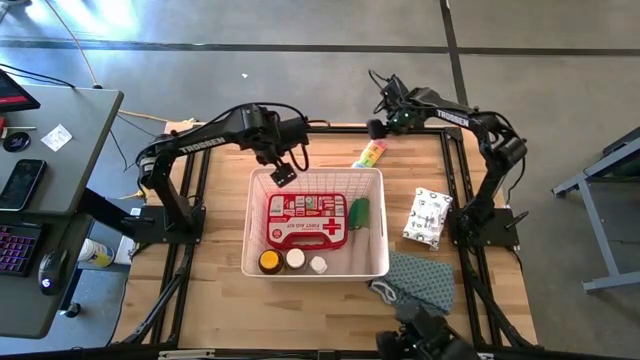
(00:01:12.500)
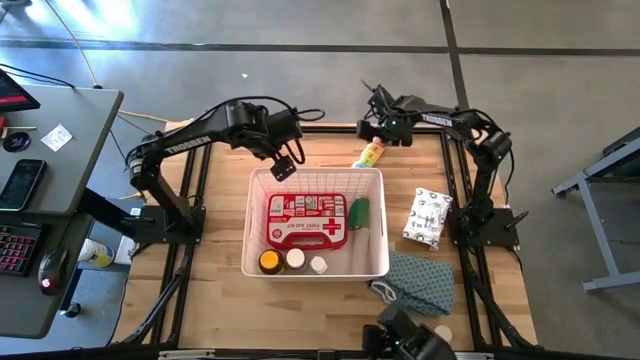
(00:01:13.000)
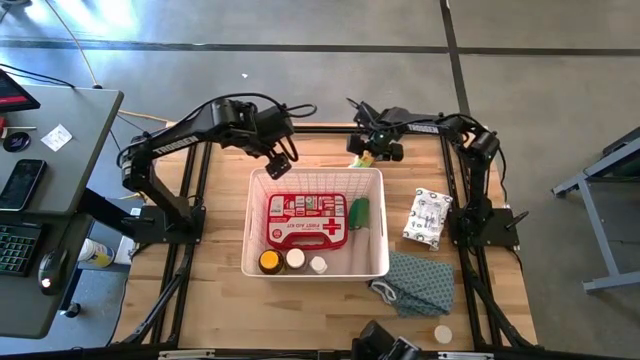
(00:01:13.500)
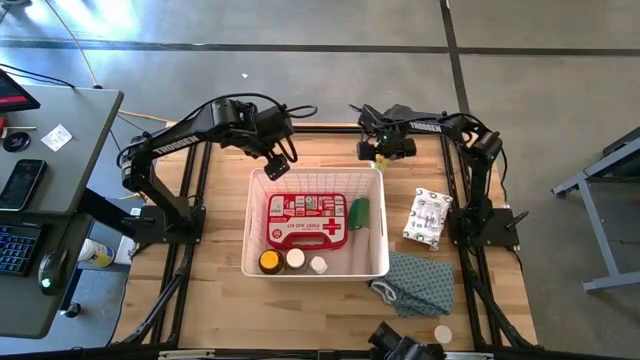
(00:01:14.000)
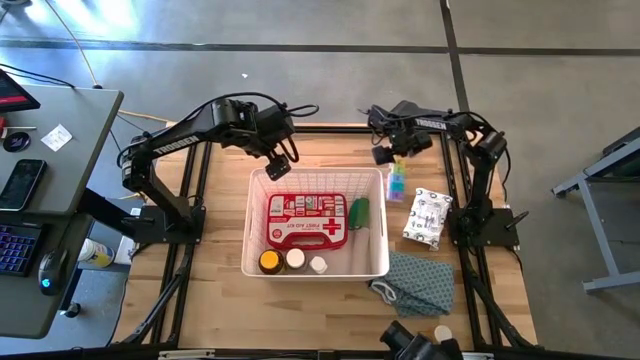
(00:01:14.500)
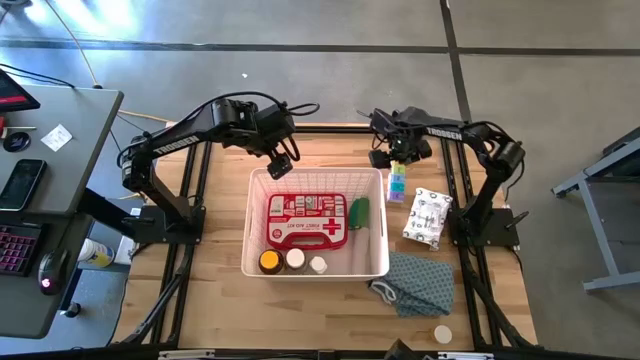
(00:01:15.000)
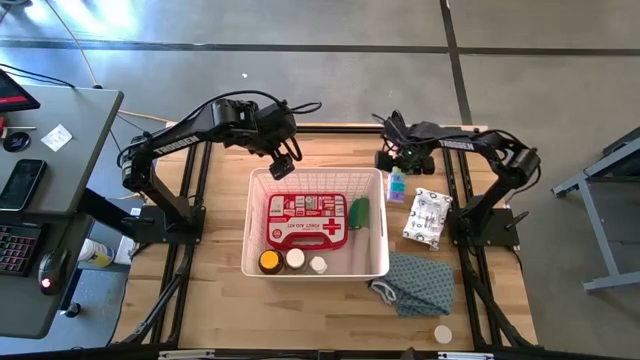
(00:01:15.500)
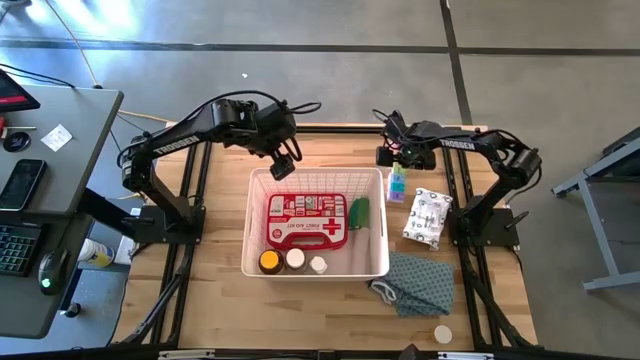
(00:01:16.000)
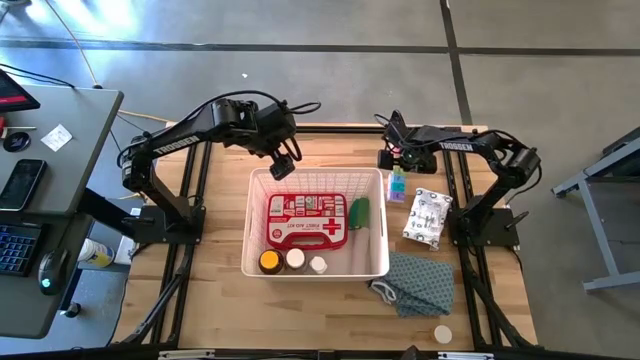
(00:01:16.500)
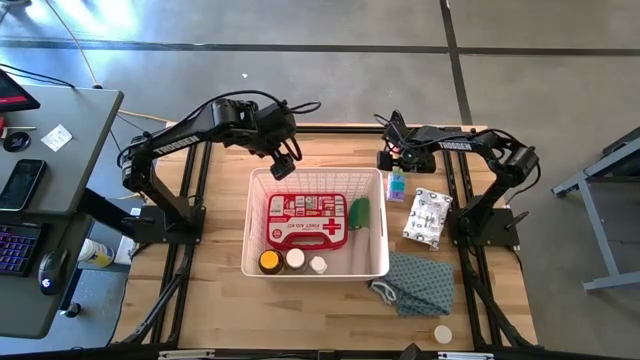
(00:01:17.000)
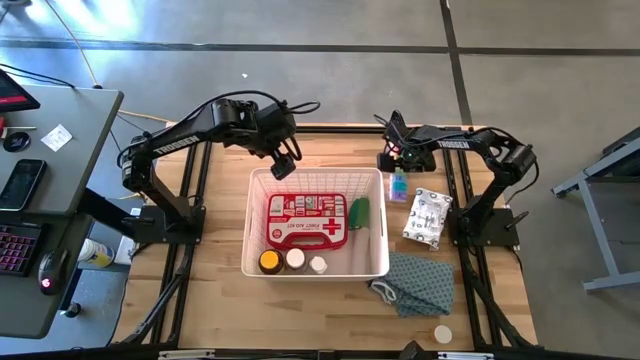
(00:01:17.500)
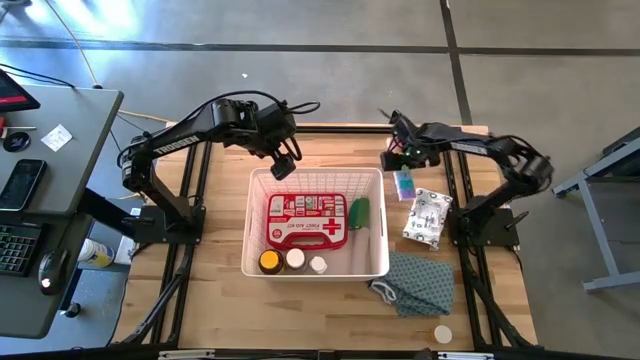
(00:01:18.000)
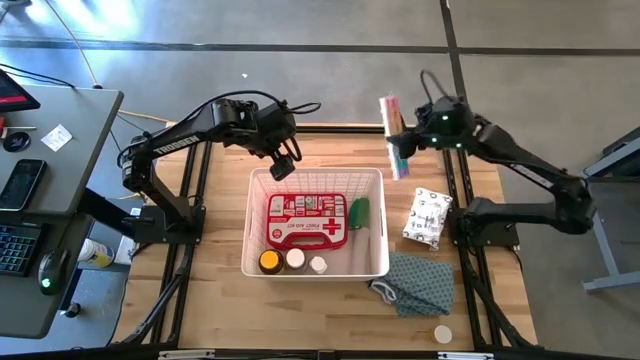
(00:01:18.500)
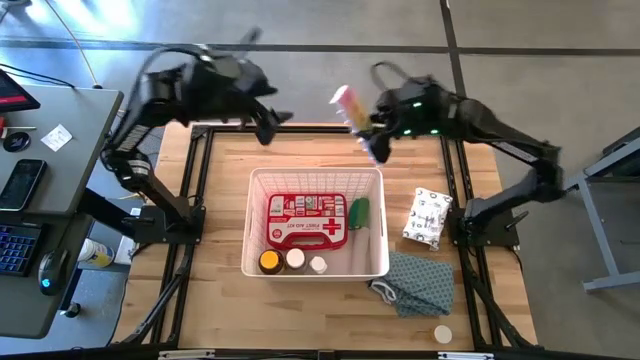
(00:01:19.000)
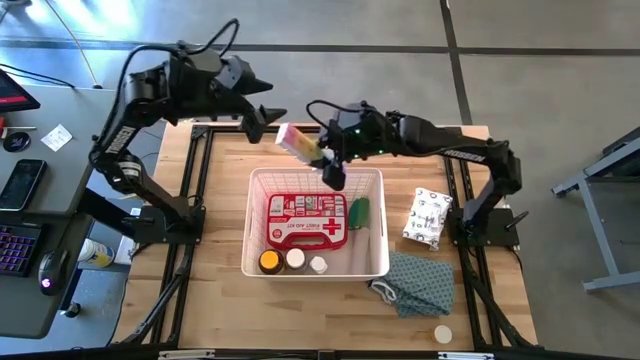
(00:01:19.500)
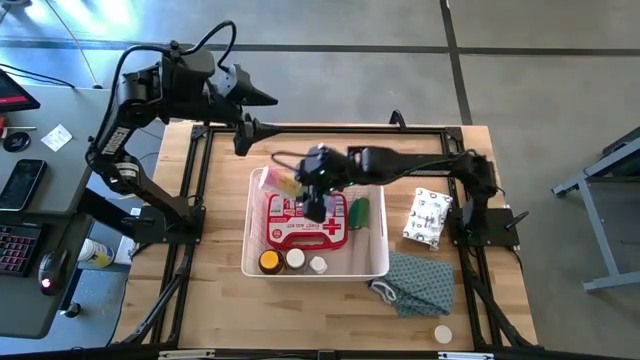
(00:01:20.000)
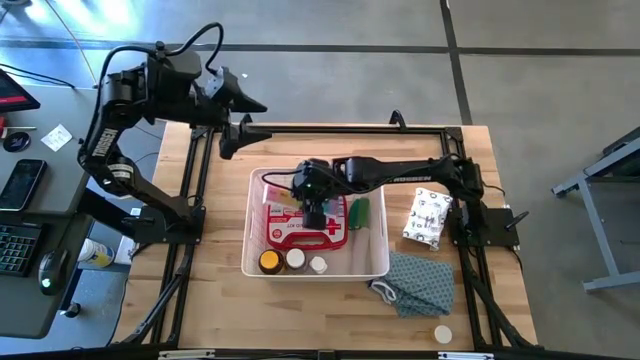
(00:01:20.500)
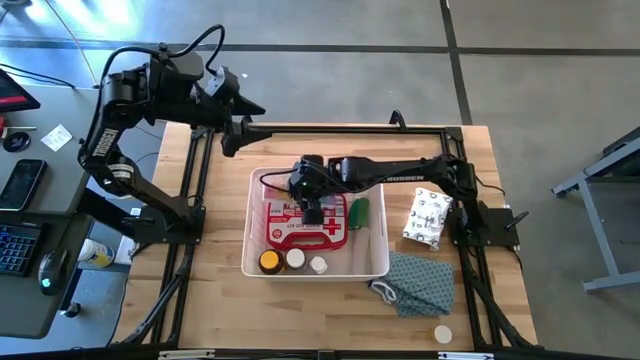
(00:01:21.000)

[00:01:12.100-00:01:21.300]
Task: Pick & place medical supplies in basket/bin
Put the medicine organizer into the white container

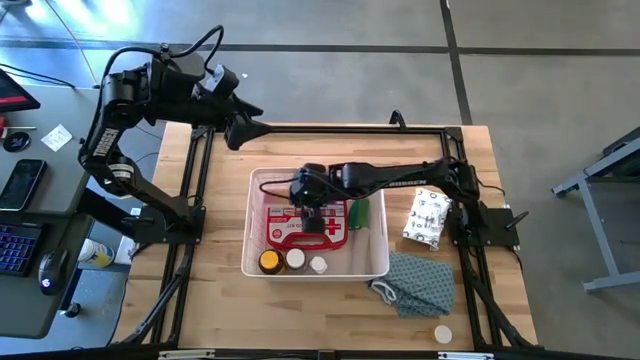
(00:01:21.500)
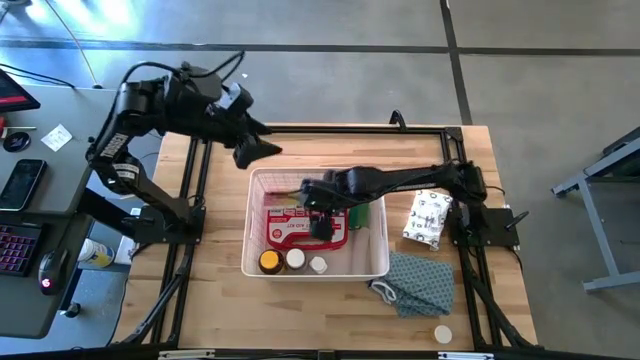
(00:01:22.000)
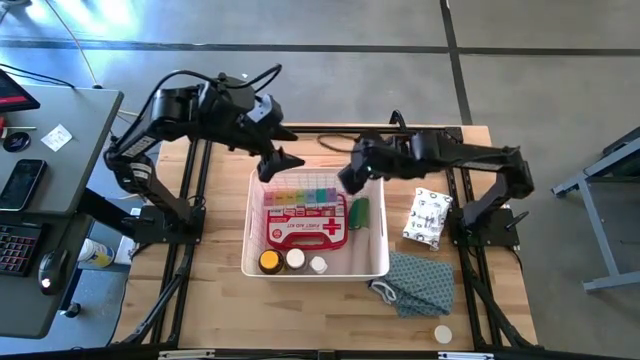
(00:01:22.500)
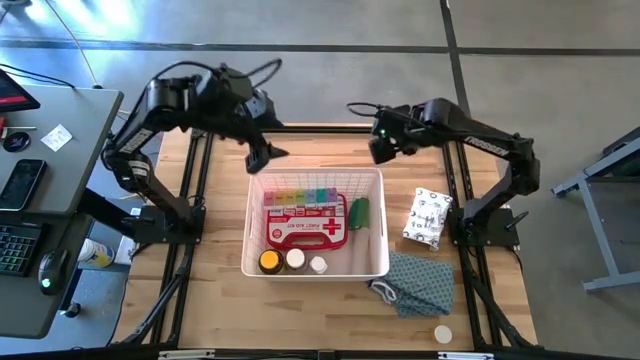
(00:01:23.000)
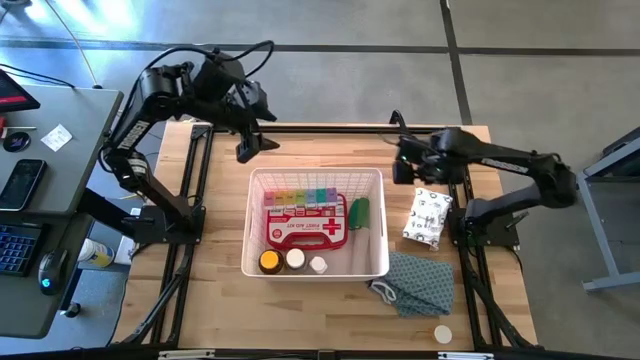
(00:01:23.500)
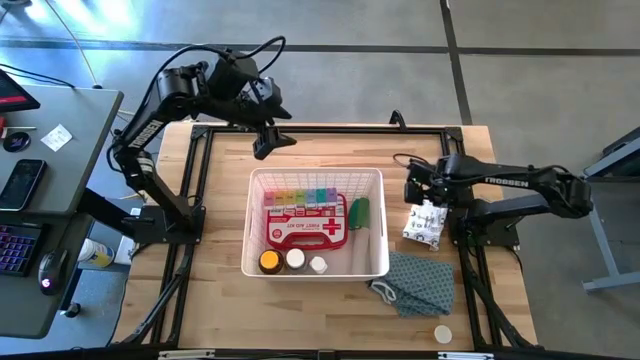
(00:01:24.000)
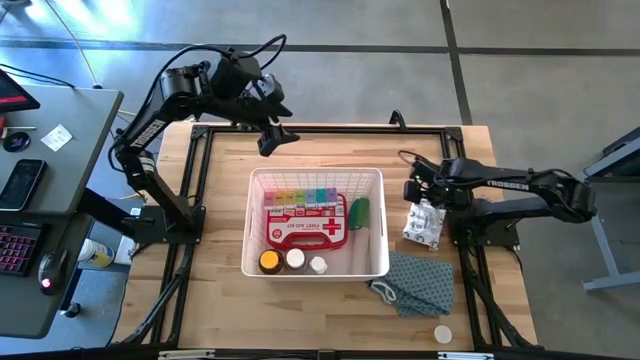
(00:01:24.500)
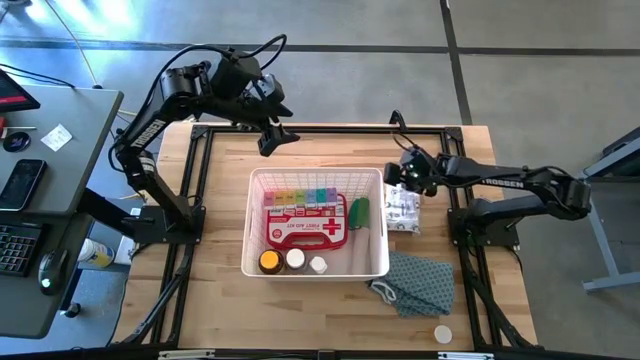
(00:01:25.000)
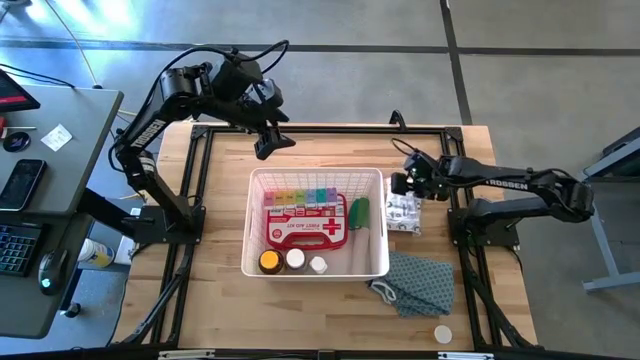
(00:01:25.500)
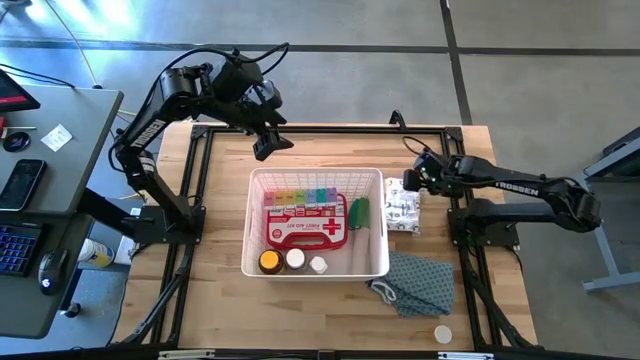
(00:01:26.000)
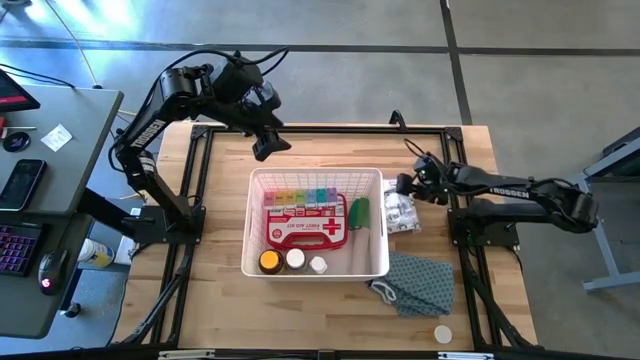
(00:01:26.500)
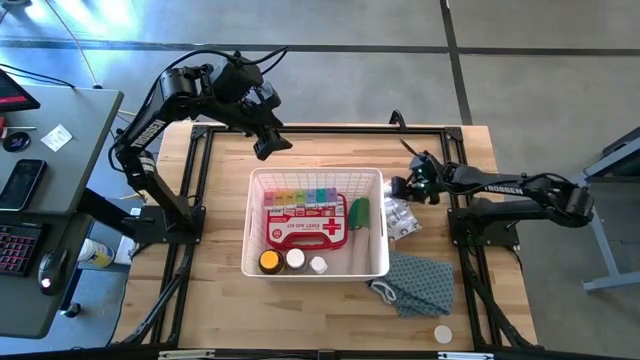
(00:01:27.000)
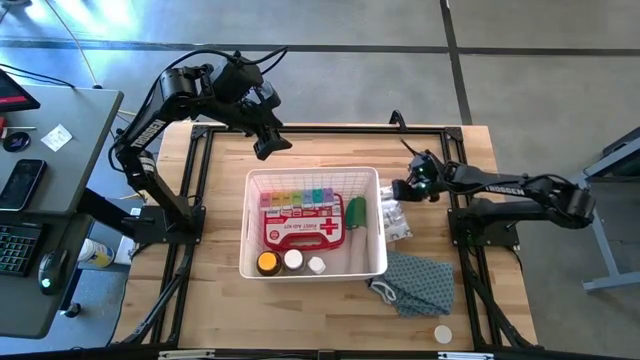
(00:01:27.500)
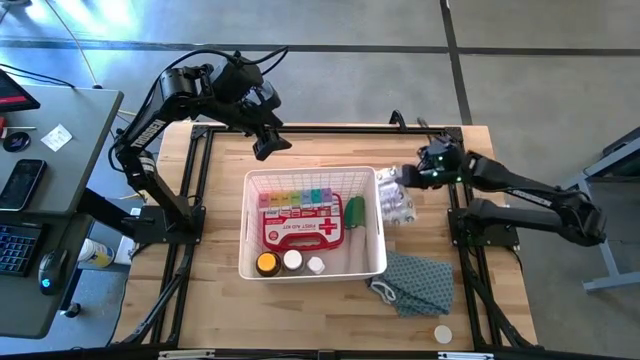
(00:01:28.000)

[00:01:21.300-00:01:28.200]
Put the white mailer bag into the white container

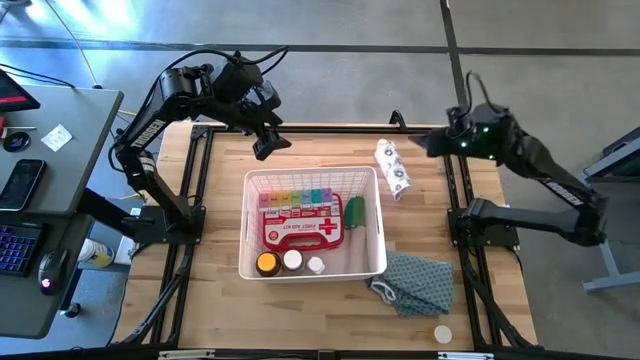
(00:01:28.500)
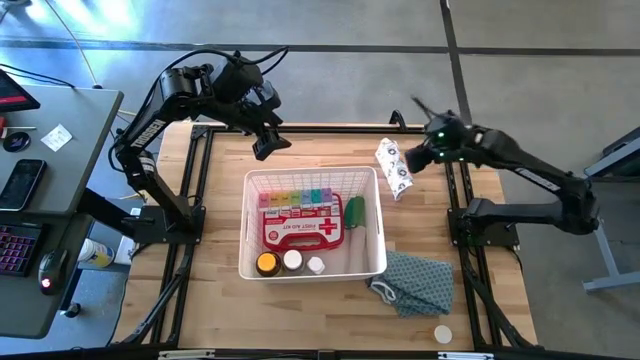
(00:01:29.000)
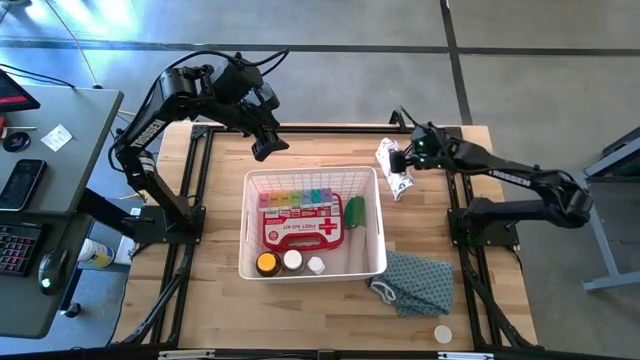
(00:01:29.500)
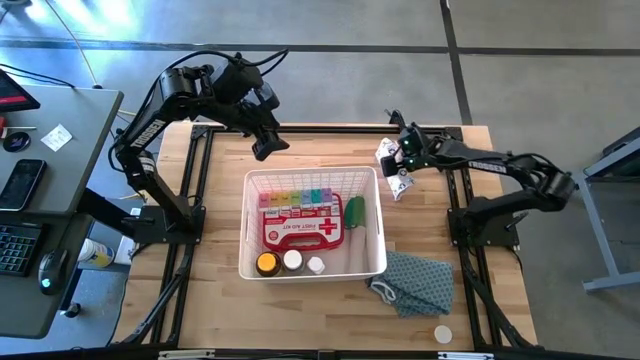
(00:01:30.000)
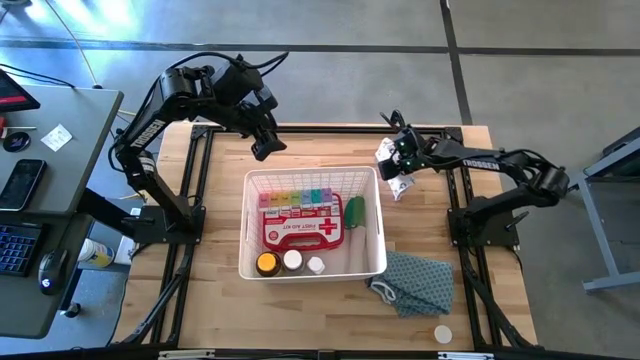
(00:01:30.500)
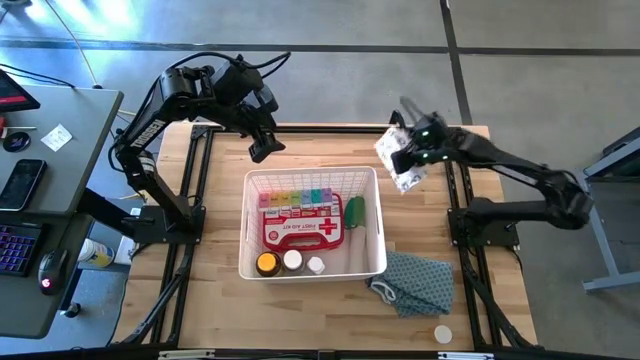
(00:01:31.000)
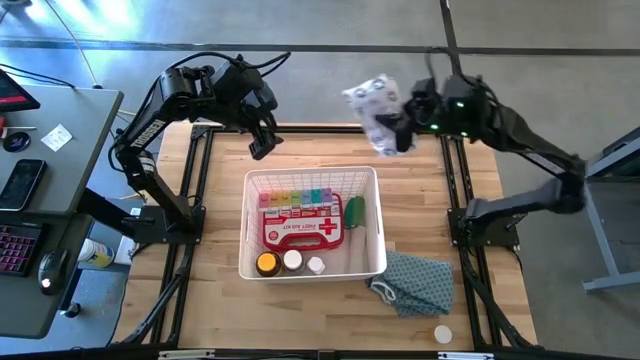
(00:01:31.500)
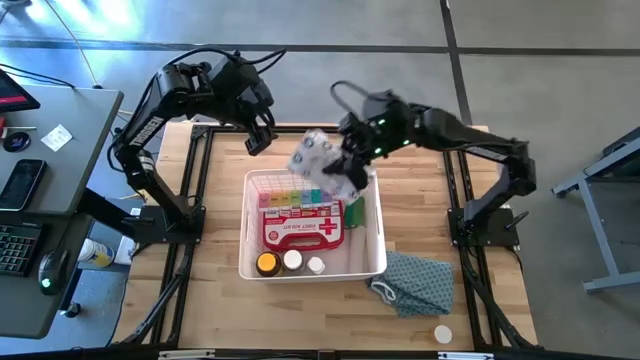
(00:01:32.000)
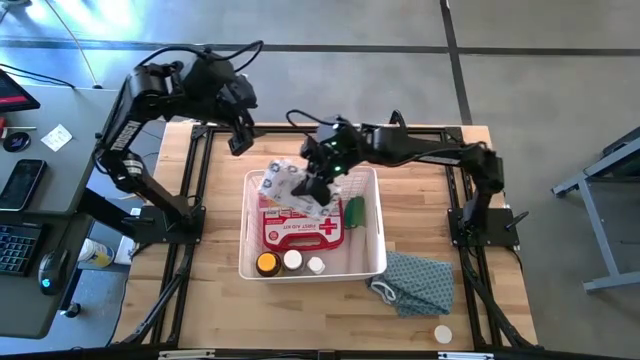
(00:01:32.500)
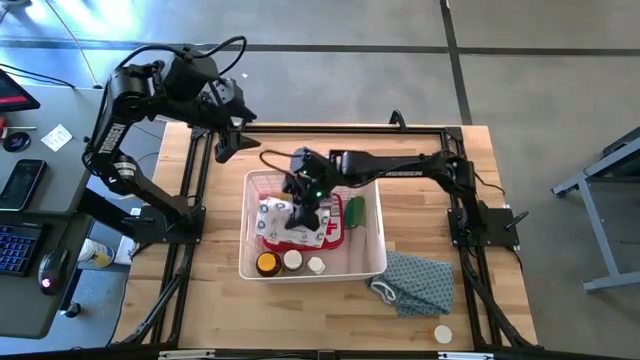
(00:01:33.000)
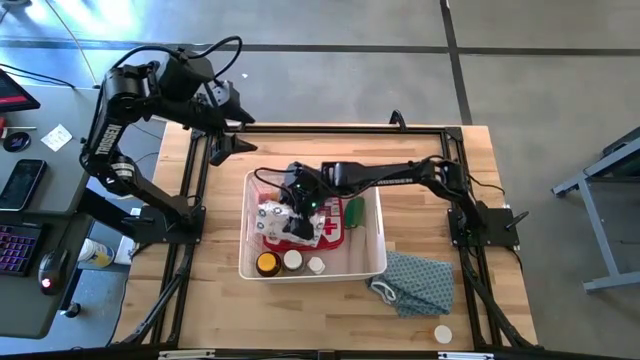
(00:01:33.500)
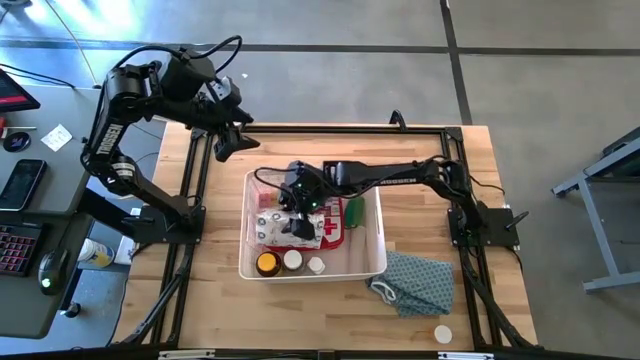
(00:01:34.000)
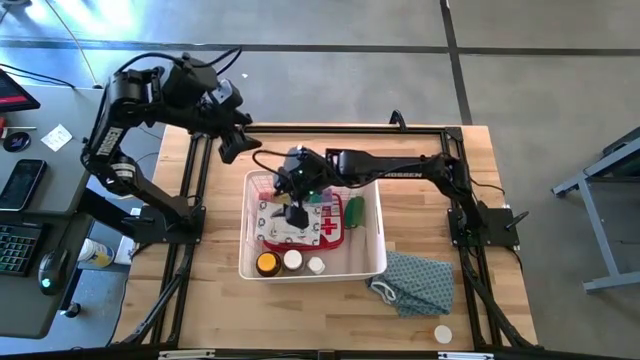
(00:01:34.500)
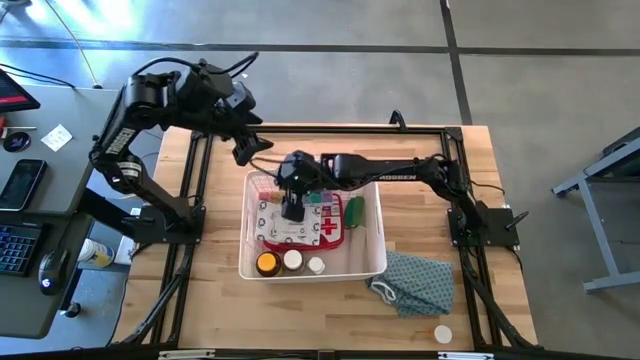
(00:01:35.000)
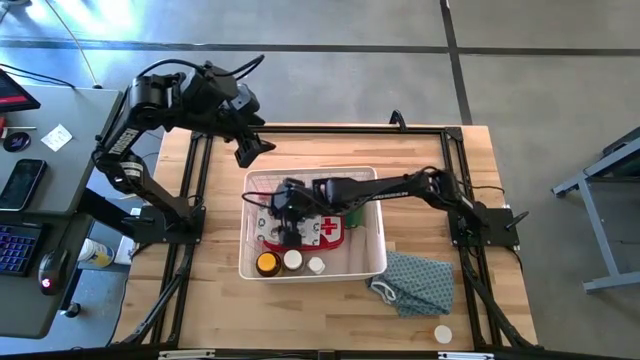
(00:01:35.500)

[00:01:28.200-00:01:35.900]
Put the white mailer bag into the white container
